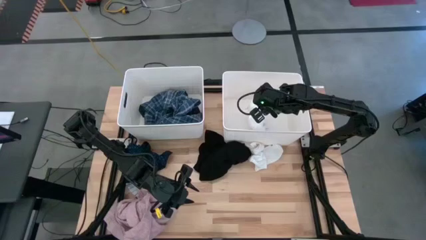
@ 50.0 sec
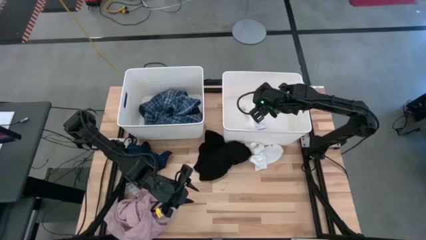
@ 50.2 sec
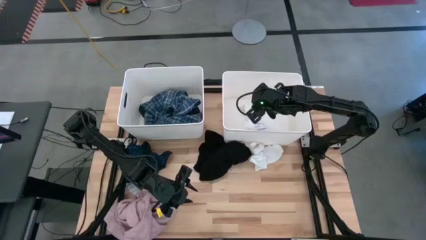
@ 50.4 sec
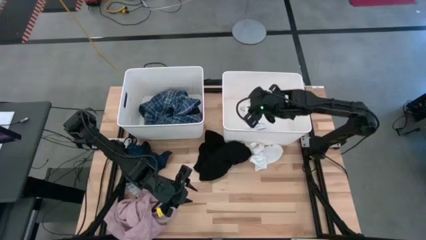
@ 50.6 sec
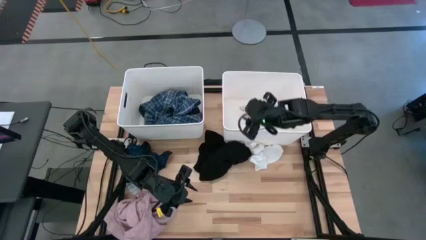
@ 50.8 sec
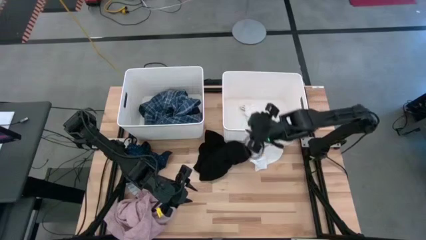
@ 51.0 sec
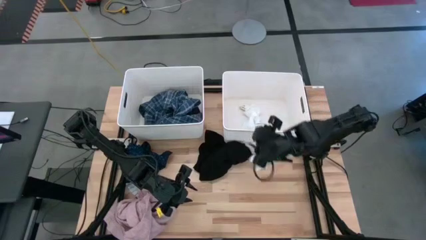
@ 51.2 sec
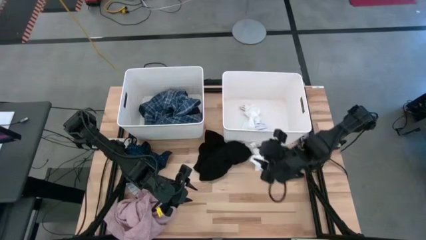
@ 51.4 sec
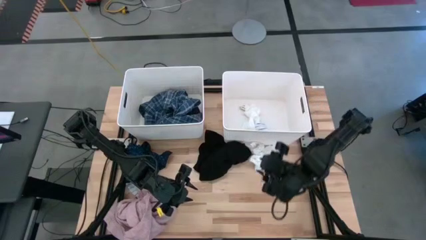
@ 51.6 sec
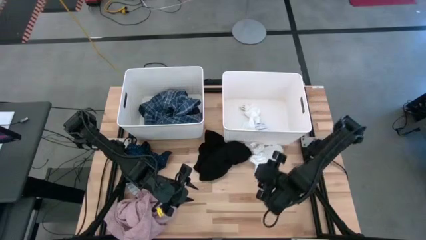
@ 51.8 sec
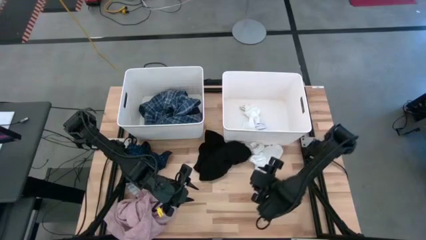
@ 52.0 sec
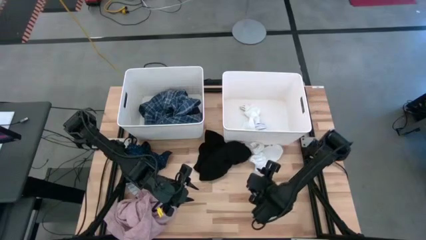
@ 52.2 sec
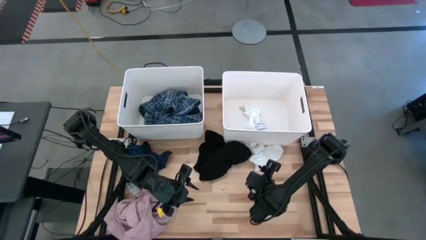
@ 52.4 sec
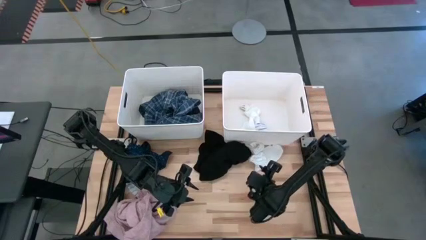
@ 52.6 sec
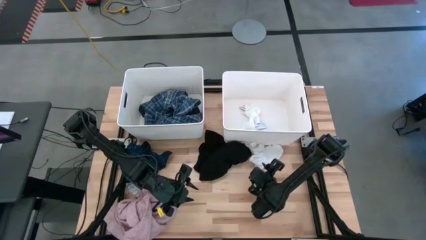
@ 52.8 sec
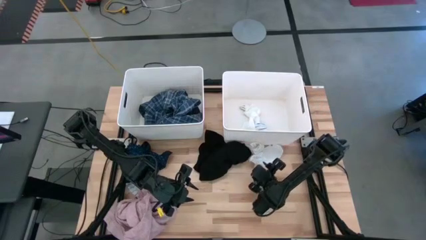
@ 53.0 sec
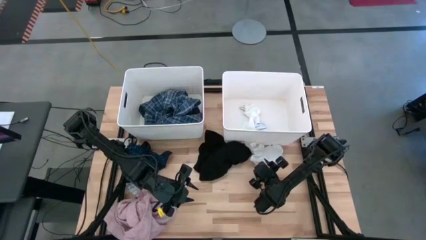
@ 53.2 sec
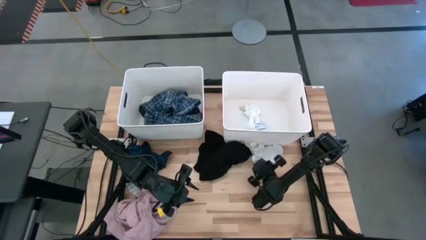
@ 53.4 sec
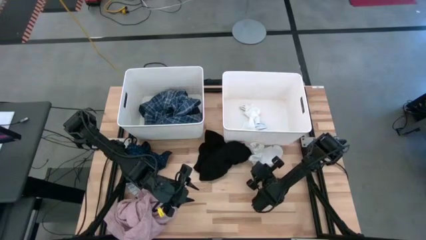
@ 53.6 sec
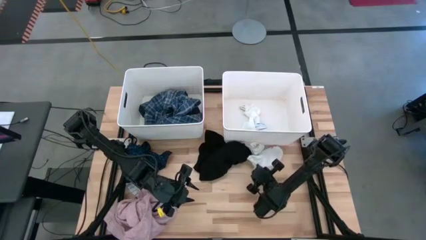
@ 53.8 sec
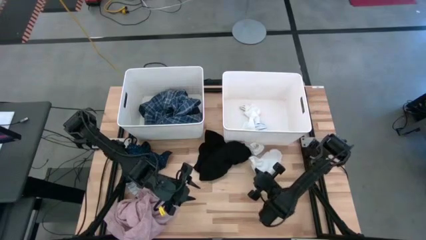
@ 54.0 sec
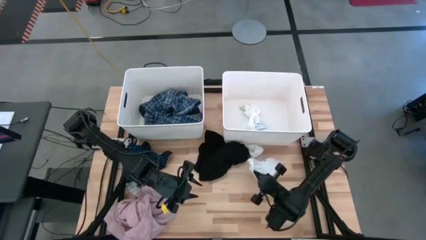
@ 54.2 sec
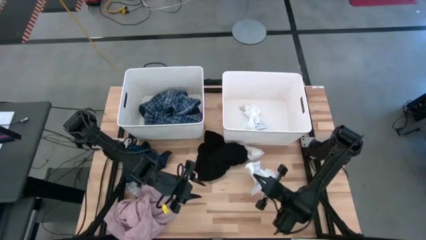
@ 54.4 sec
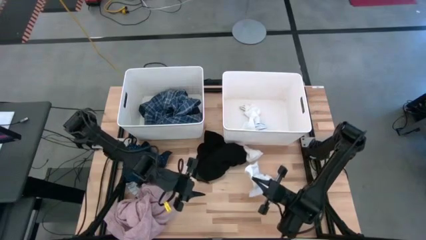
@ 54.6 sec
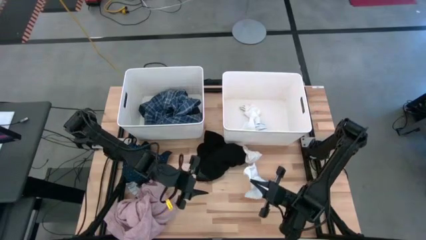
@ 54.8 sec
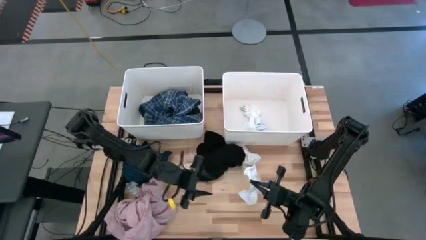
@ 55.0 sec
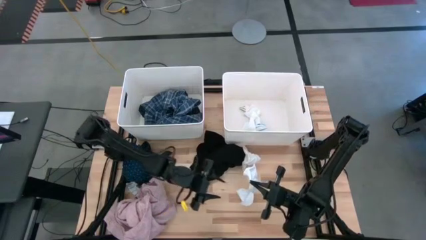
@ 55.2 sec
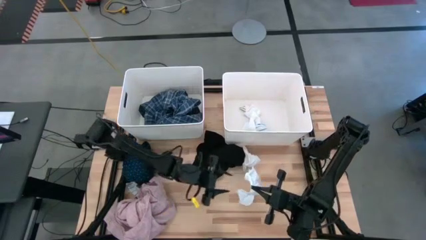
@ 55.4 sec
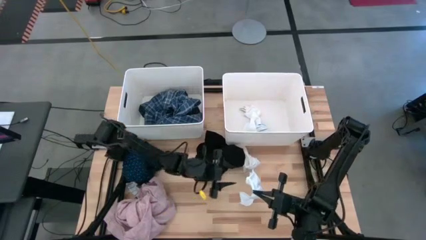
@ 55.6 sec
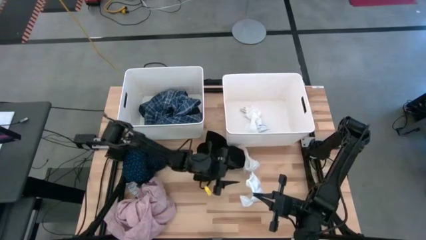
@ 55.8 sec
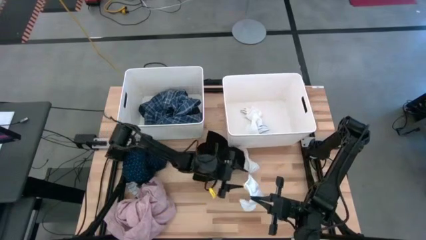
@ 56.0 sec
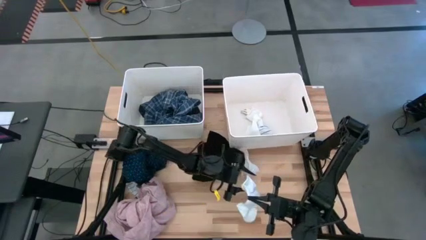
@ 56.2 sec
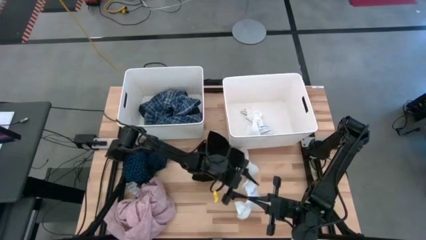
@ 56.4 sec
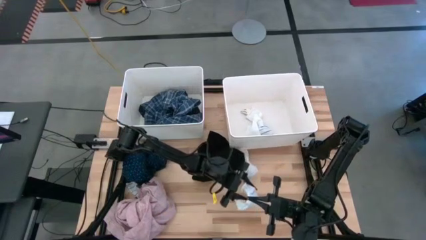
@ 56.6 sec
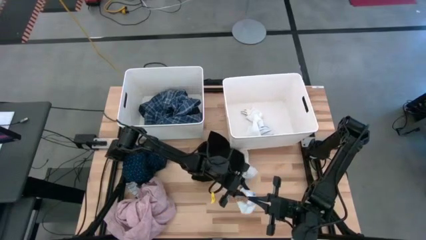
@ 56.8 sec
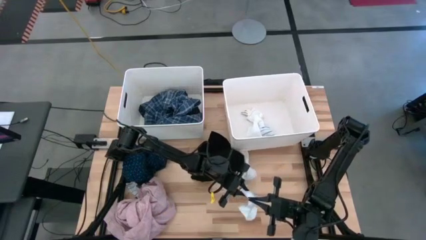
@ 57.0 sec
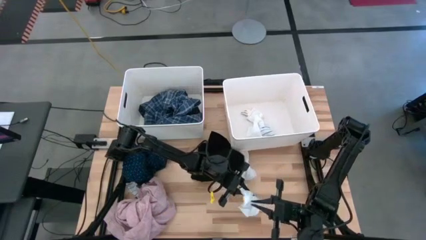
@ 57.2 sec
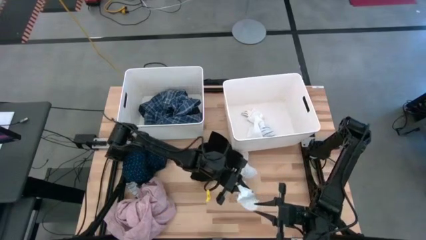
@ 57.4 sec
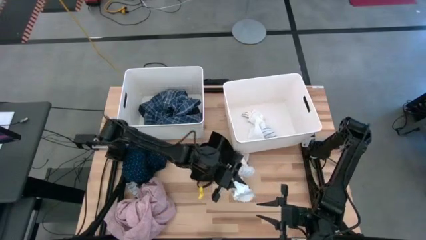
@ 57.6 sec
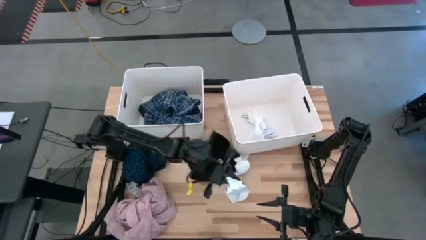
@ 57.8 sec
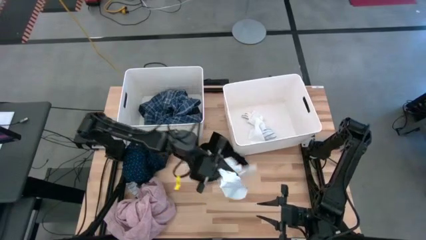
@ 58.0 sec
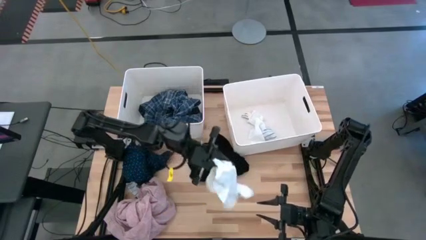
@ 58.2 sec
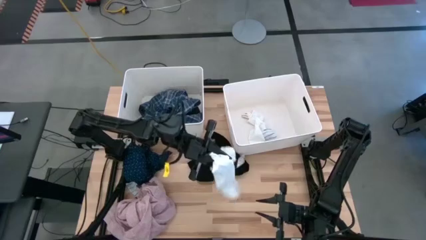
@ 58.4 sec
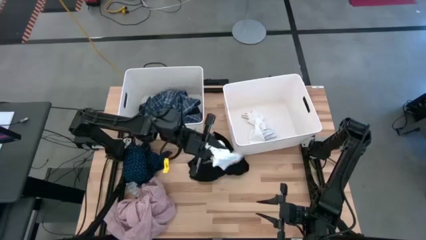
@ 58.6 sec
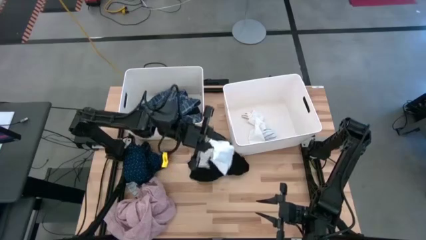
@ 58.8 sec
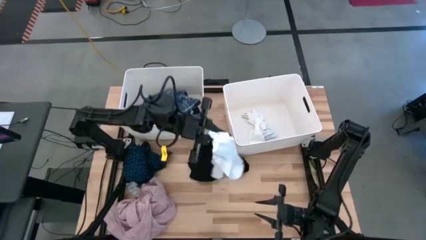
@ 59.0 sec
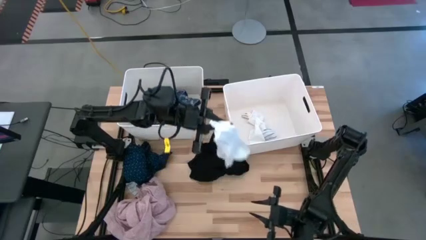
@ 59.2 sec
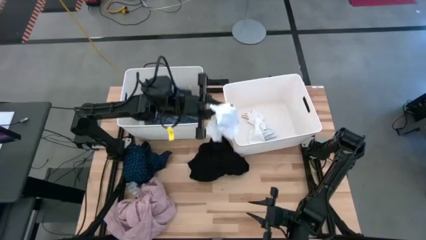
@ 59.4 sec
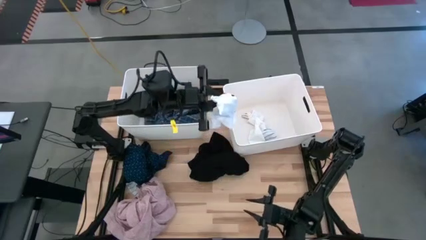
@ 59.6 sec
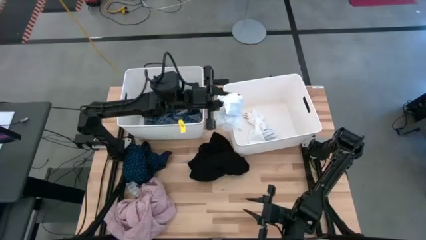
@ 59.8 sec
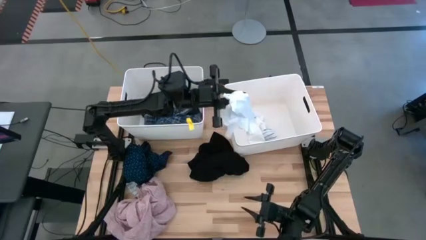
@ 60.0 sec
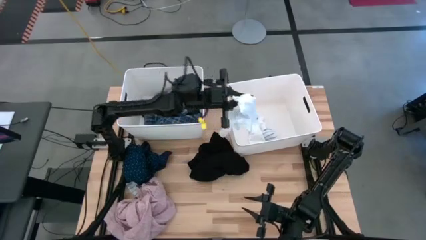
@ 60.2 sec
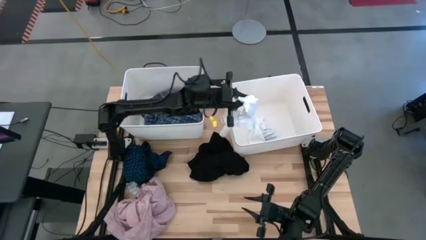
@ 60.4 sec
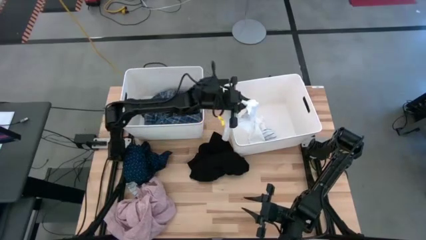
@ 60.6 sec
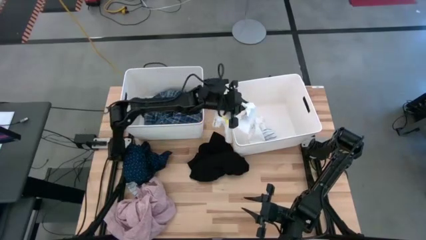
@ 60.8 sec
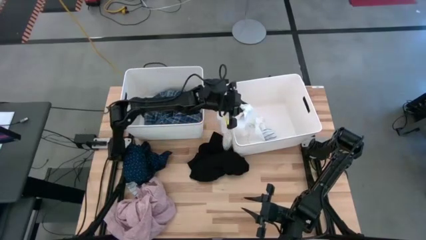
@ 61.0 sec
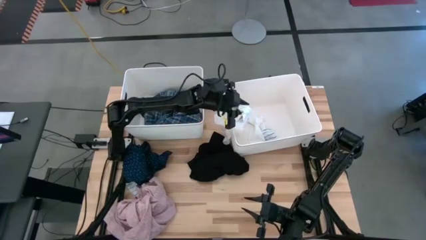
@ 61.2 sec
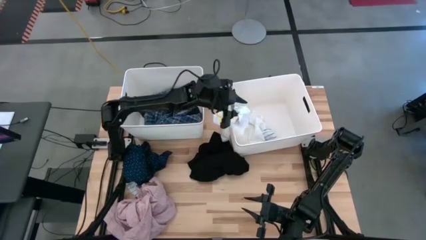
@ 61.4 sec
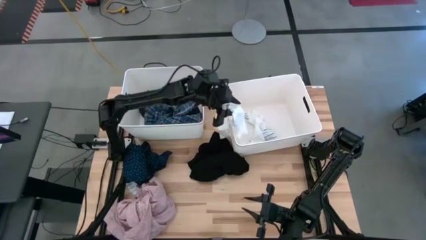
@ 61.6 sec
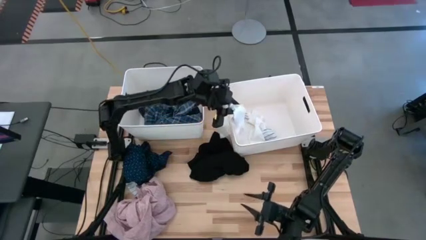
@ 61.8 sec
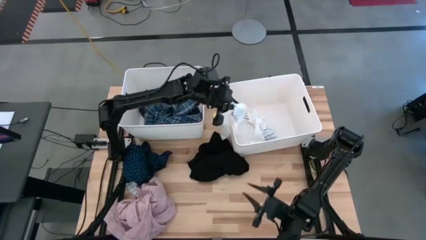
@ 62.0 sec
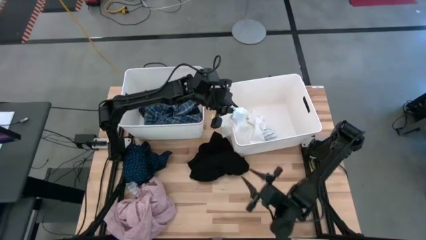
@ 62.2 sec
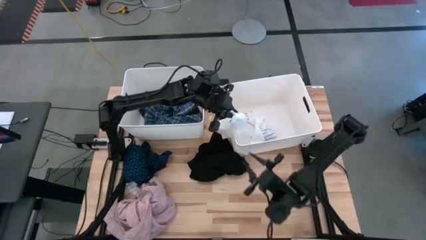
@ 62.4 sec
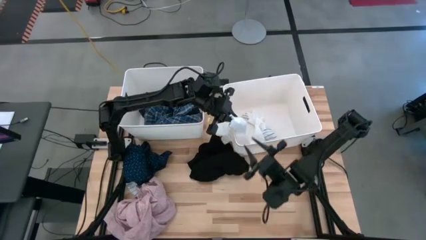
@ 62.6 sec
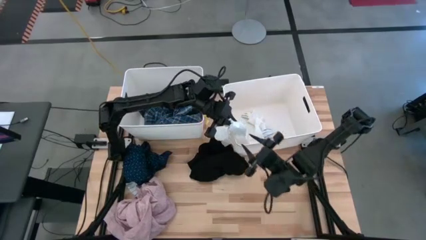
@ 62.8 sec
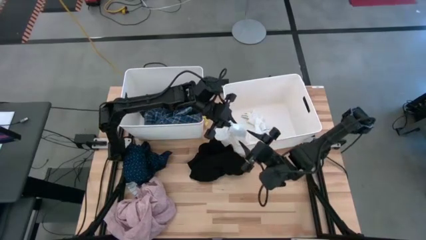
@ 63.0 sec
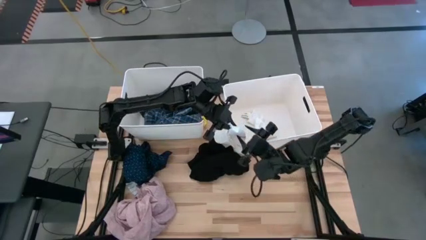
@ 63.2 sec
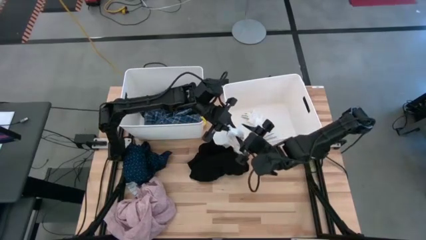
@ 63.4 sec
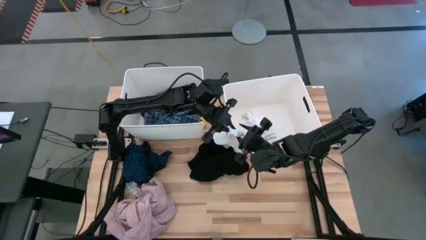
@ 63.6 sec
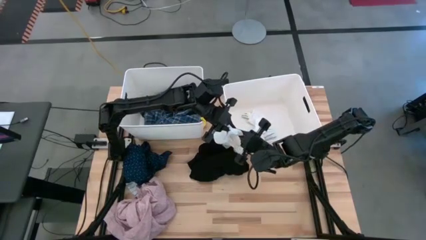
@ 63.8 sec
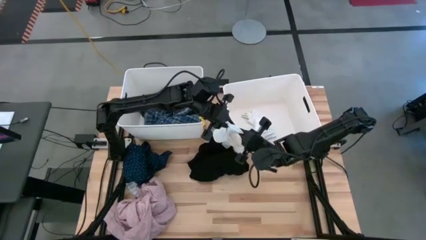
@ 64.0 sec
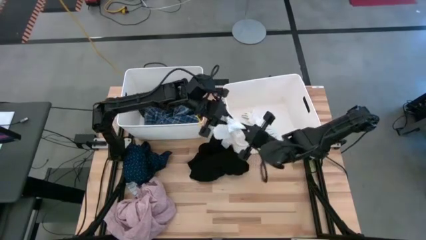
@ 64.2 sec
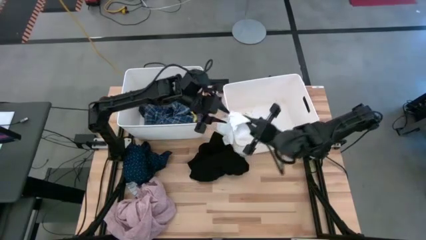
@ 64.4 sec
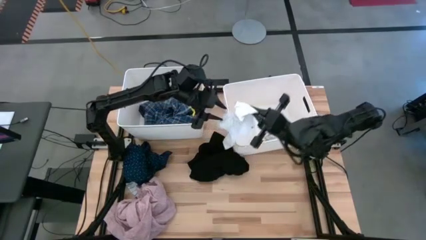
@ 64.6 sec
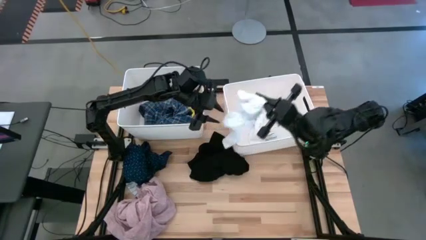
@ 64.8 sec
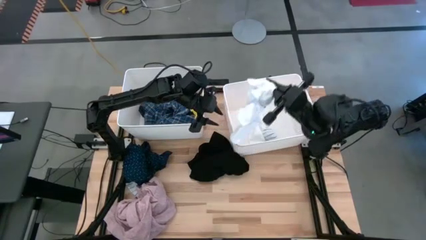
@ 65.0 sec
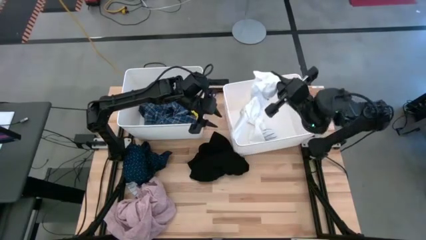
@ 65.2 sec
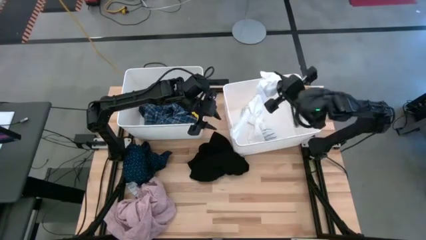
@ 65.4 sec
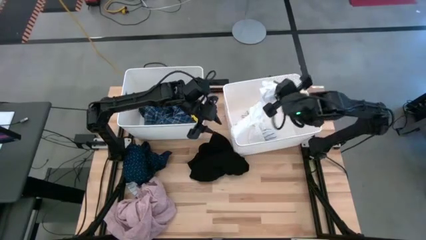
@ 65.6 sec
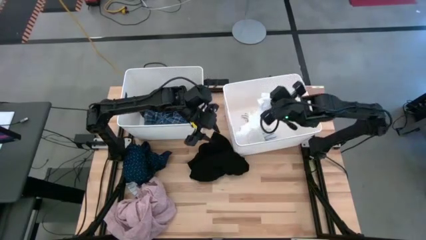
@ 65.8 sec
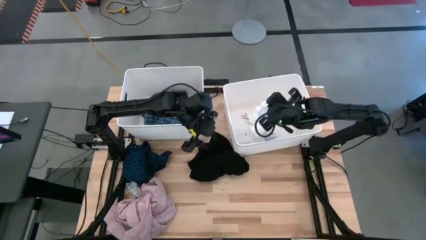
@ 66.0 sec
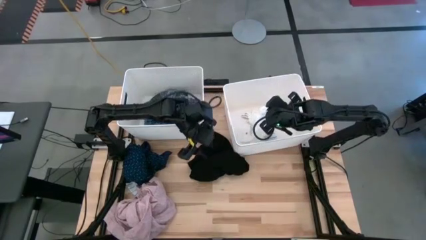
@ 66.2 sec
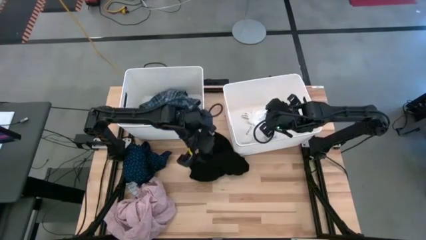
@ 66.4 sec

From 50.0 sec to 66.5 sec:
Task: Sort clothes
Put the white socks into the right laundry bin
